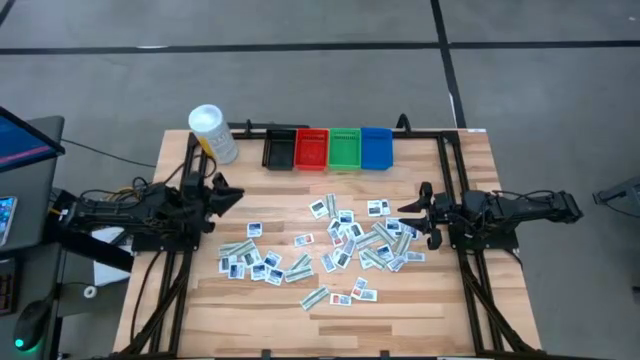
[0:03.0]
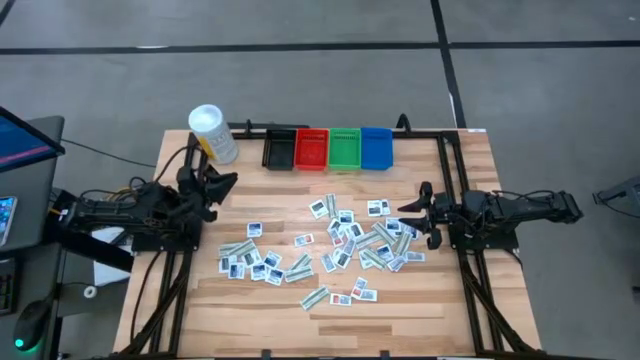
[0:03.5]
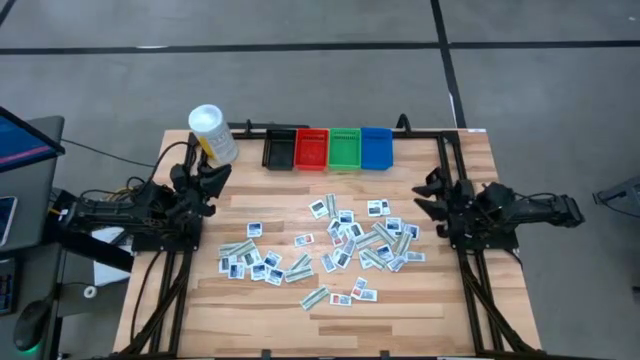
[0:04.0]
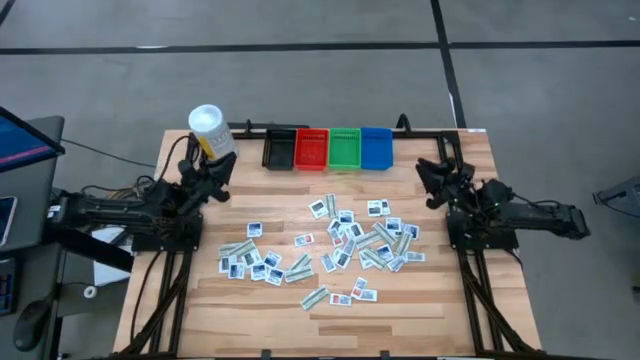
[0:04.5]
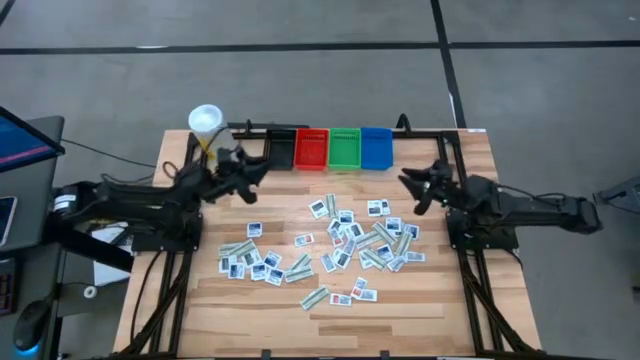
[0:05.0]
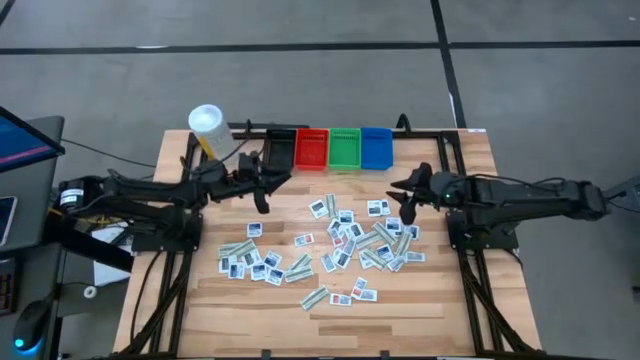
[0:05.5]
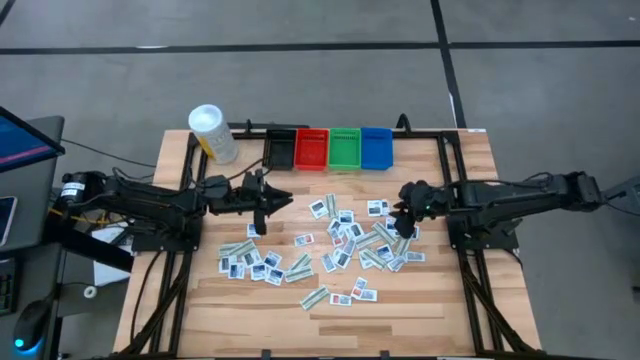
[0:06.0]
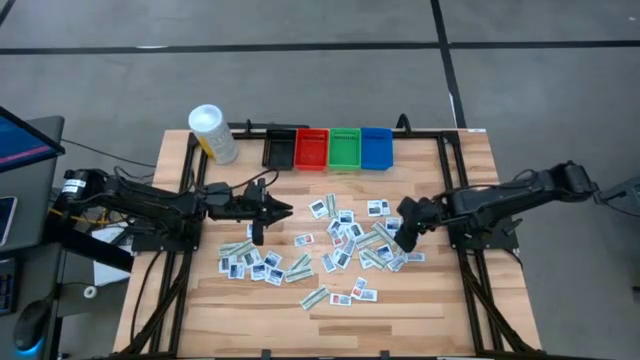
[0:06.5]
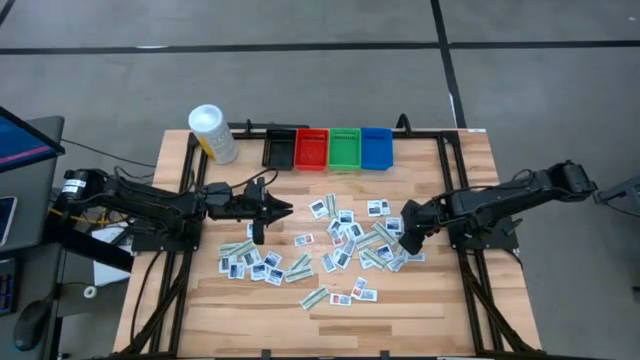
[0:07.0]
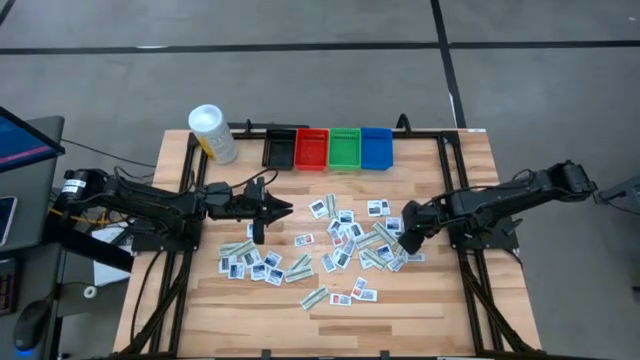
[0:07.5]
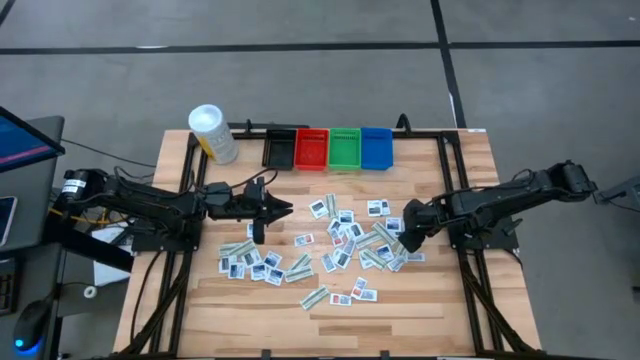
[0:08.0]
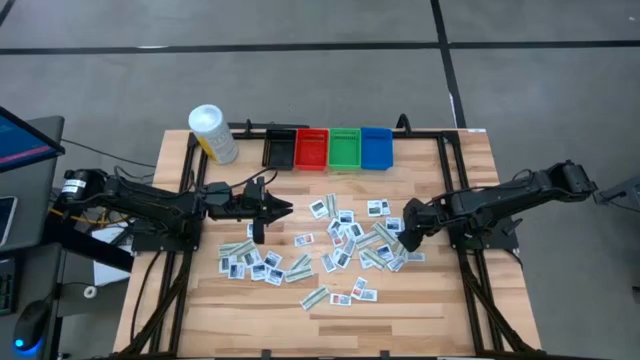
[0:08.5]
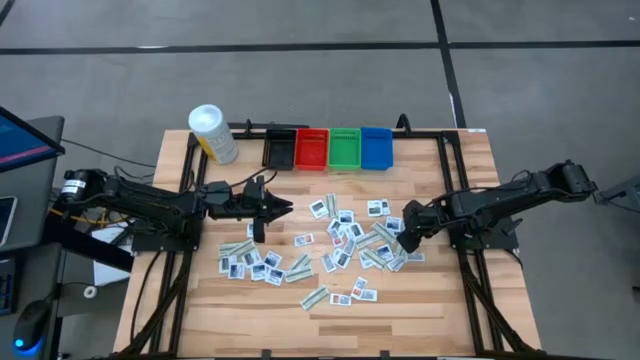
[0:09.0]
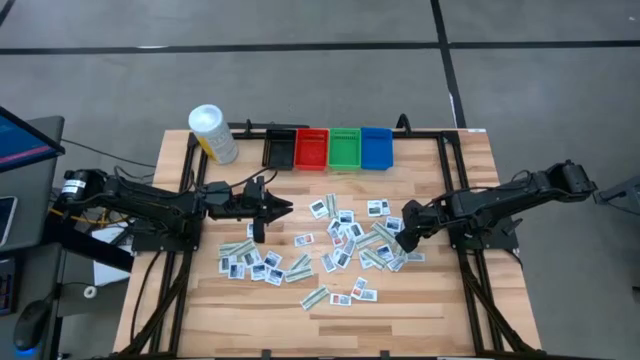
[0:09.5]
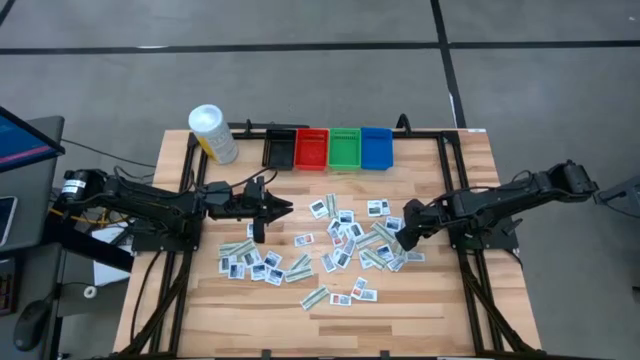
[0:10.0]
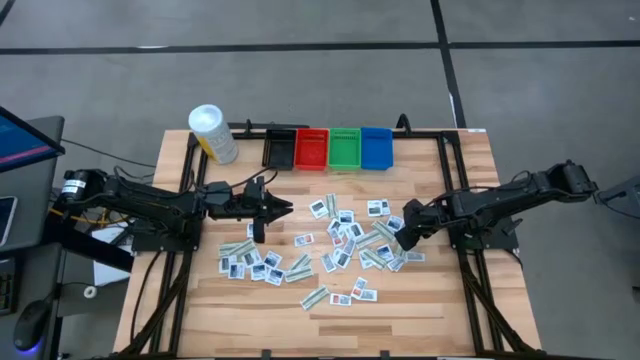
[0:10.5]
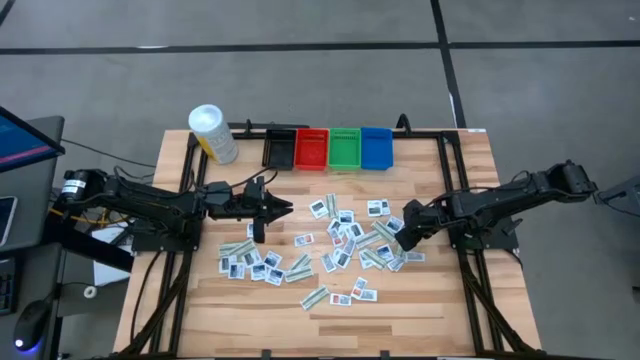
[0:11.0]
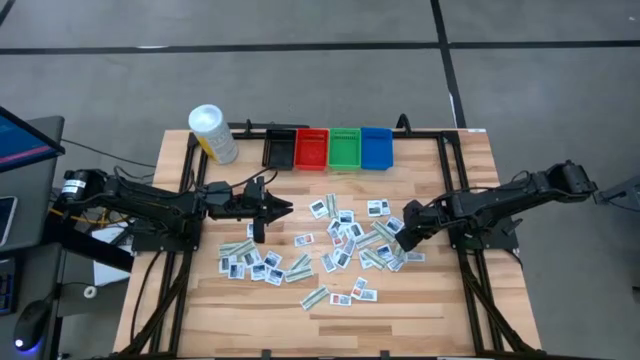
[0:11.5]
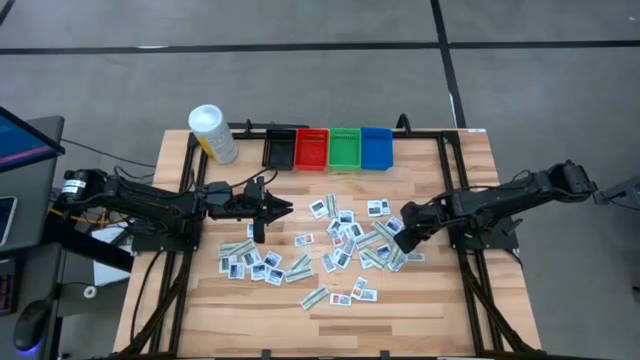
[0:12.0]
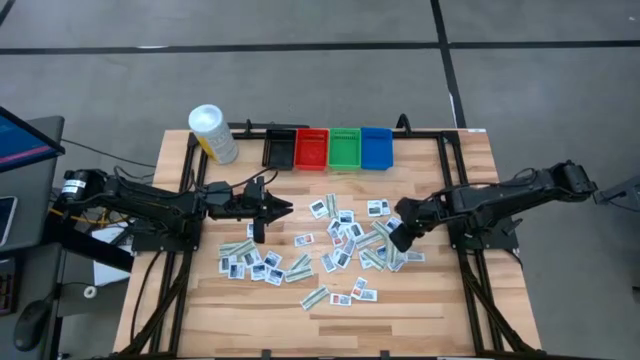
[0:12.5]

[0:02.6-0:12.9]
Task: Pick & Place First Aid Supplies
Put the bandage pack into the blue bin

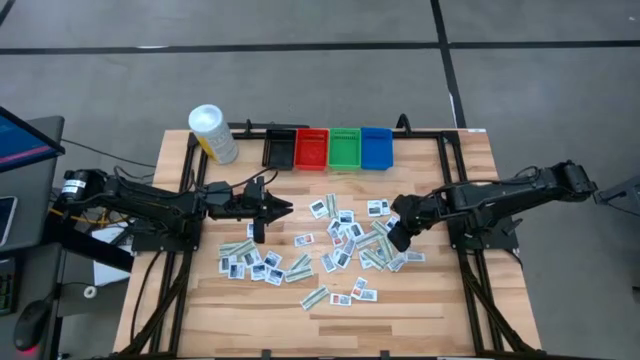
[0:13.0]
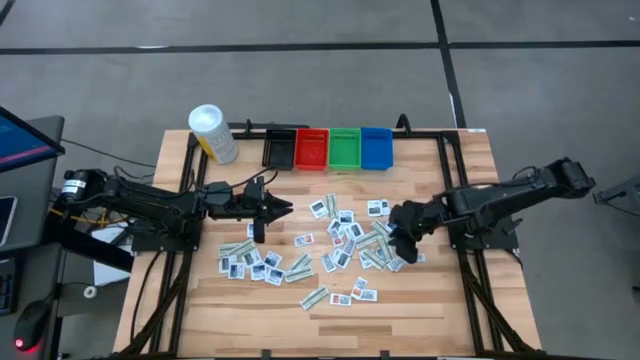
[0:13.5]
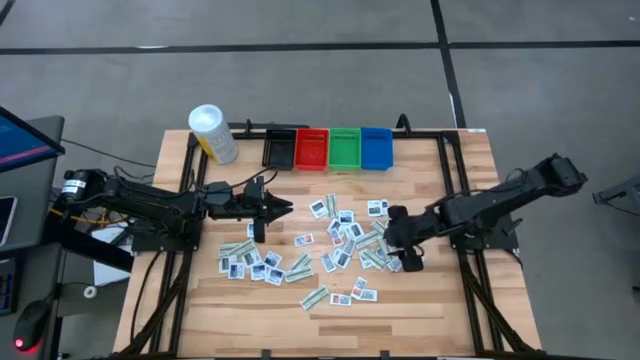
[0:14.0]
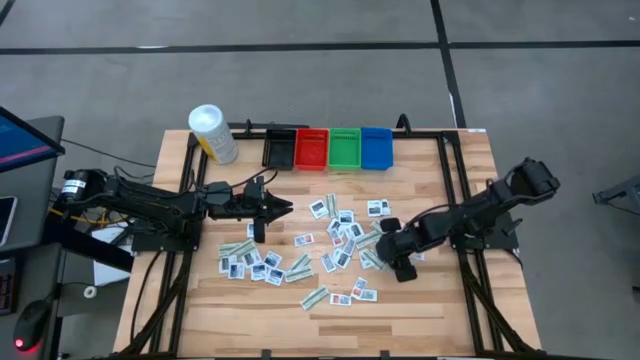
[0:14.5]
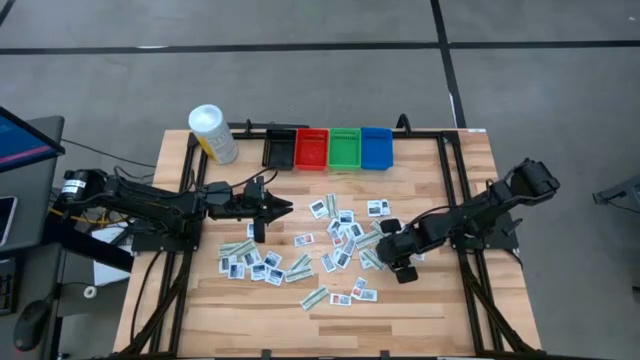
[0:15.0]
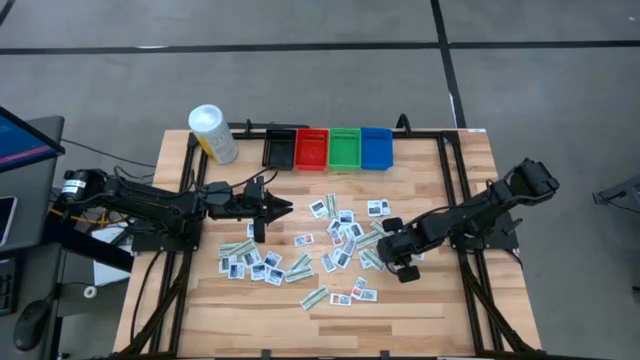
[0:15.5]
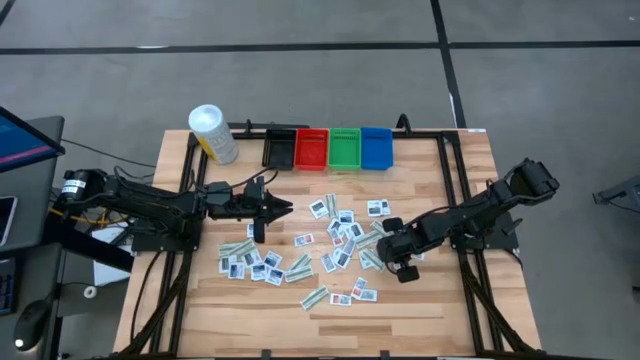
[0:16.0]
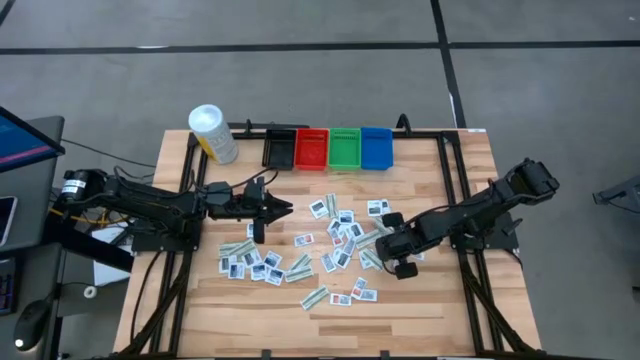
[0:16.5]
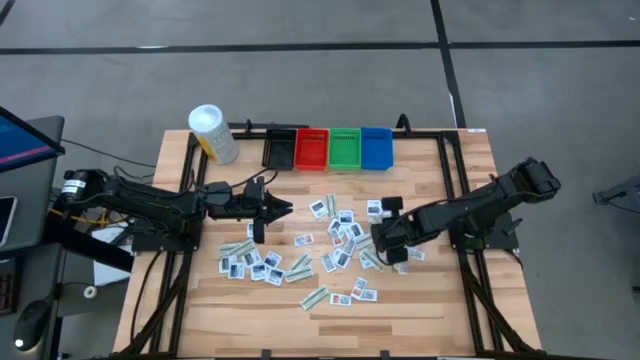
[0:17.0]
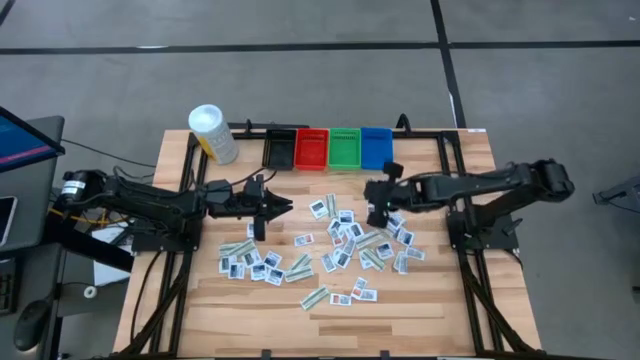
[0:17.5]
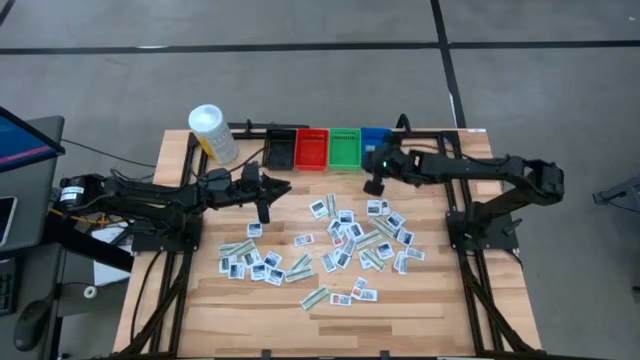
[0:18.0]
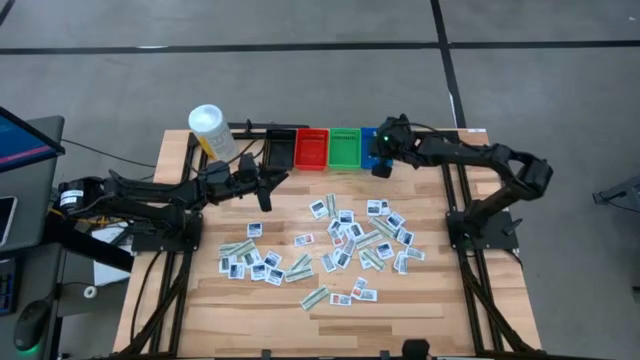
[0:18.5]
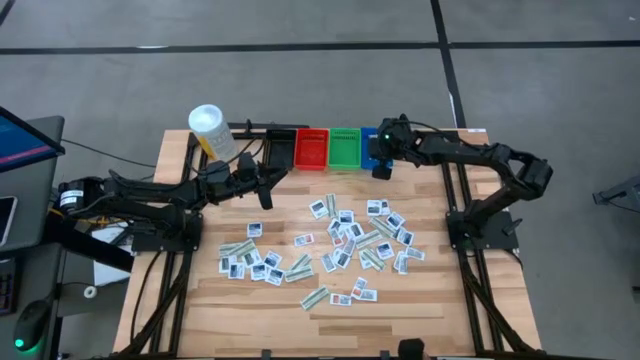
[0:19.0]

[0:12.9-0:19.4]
Put the bandage pack into the blue bin

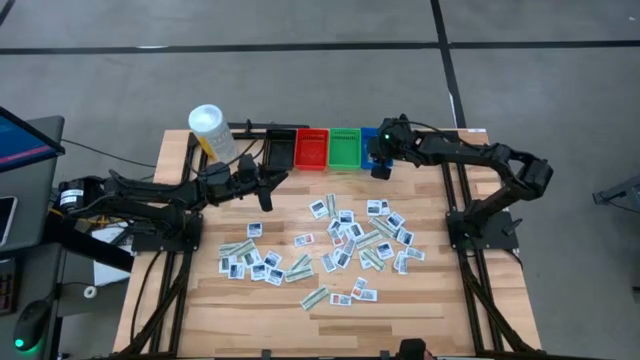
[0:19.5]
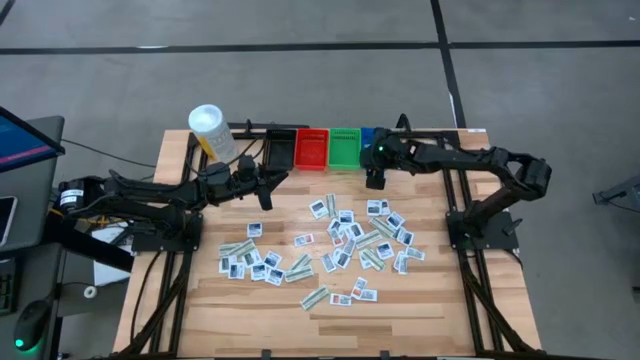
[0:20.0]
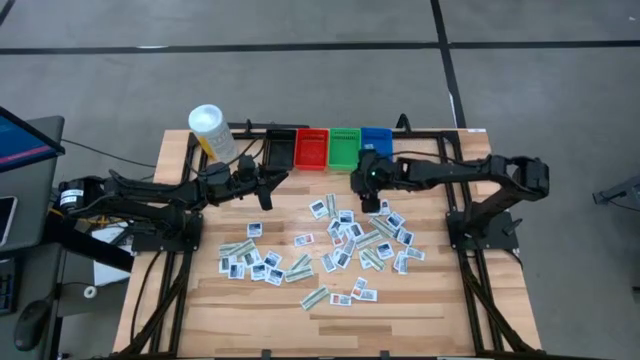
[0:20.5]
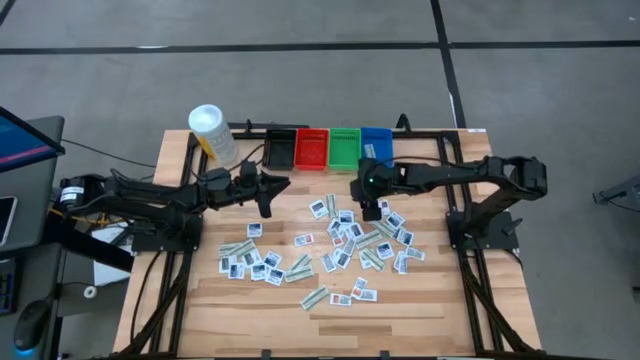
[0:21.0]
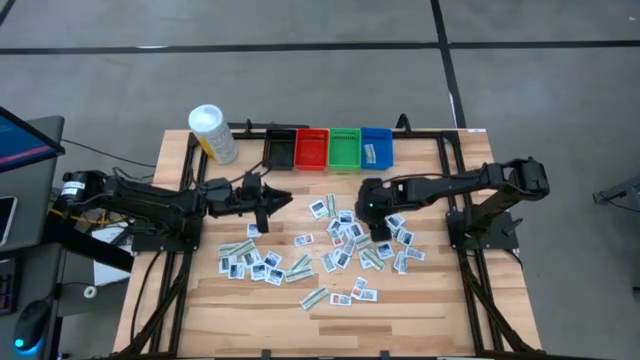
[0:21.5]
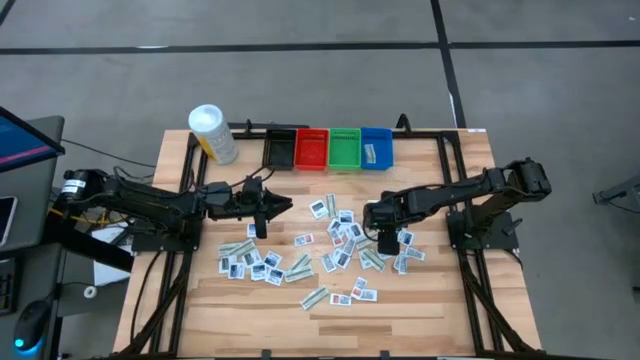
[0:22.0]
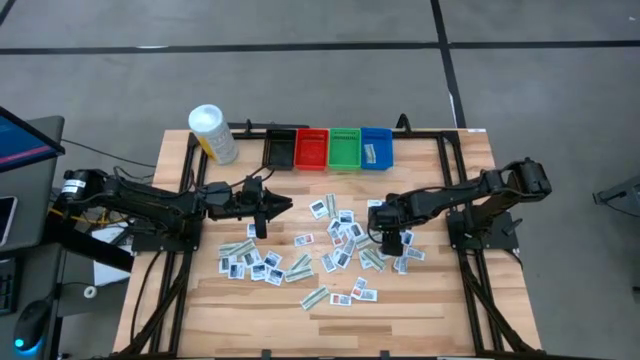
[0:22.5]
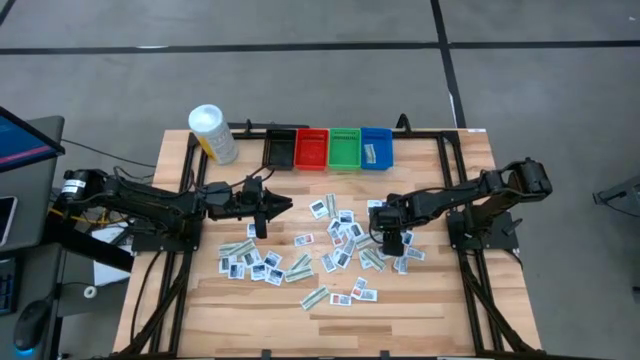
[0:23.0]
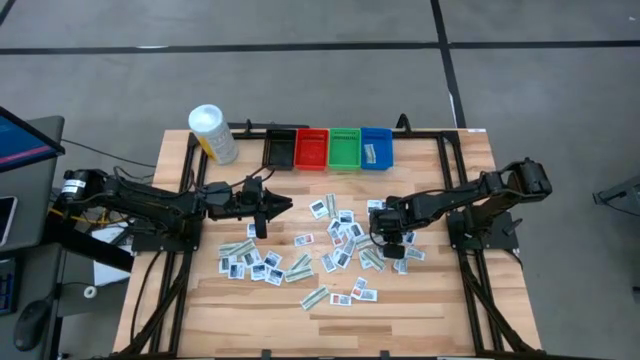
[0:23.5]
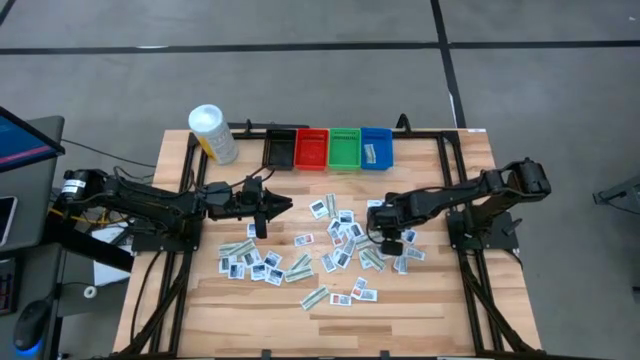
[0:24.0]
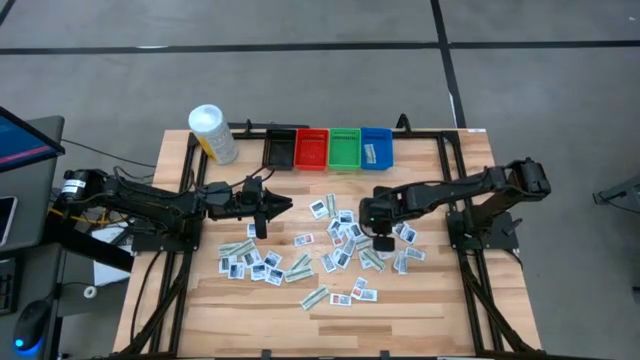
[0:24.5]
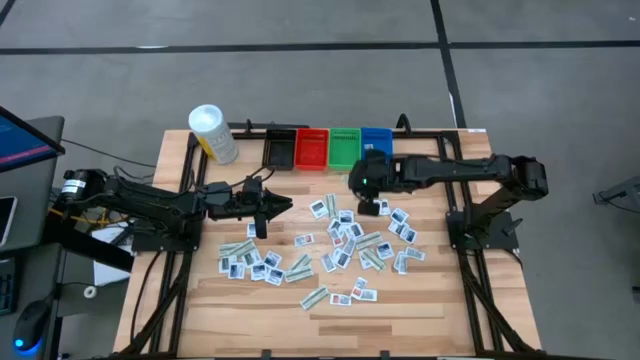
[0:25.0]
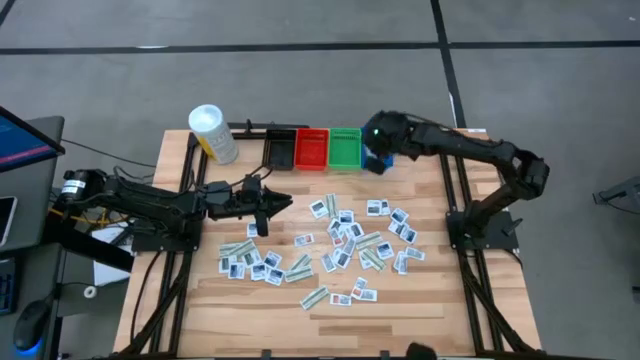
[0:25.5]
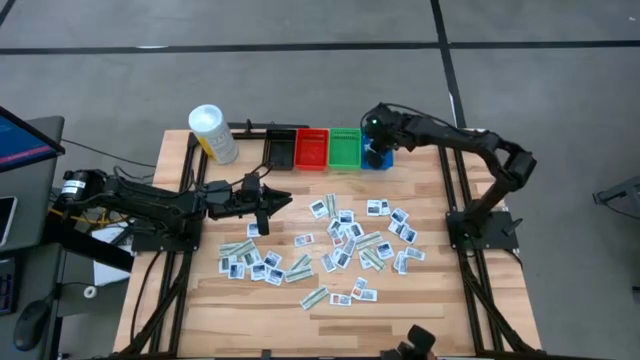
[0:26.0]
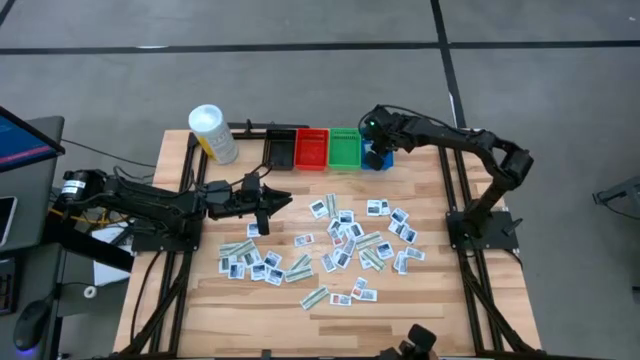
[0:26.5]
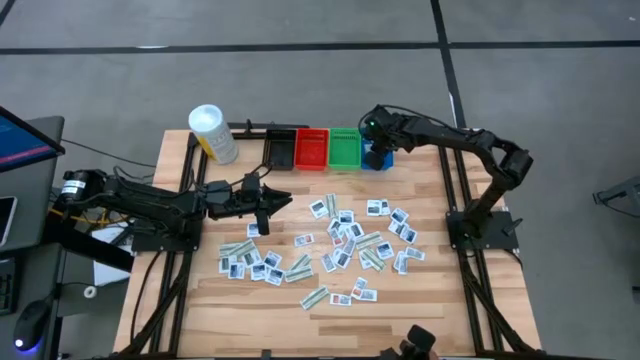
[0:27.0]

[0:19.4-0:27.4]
Put the bandage pack into the blue bin
